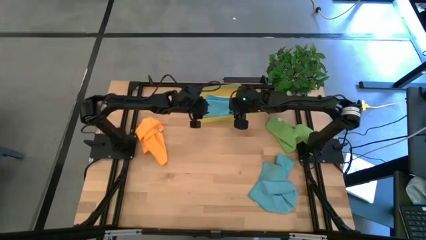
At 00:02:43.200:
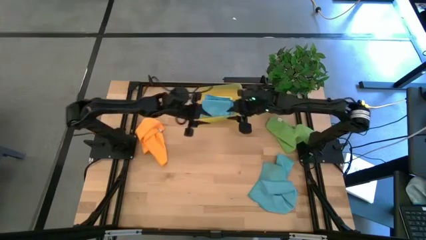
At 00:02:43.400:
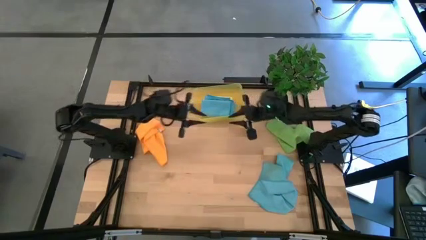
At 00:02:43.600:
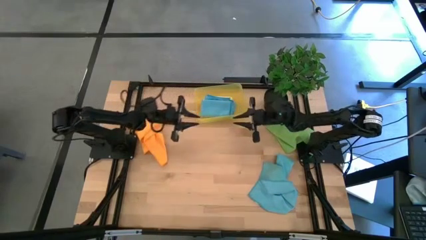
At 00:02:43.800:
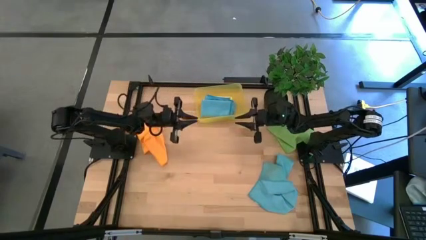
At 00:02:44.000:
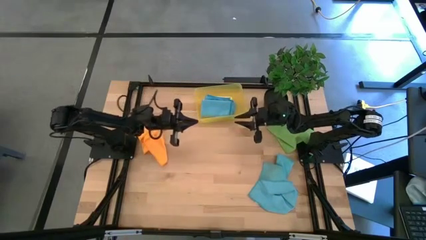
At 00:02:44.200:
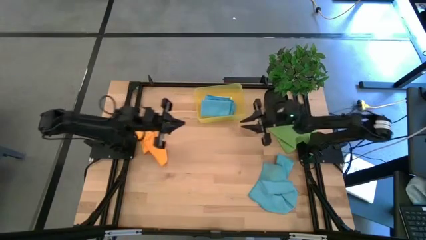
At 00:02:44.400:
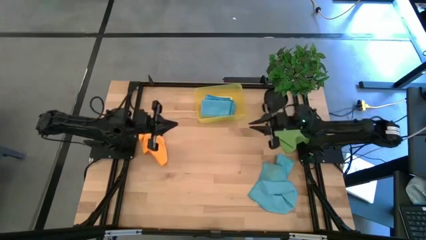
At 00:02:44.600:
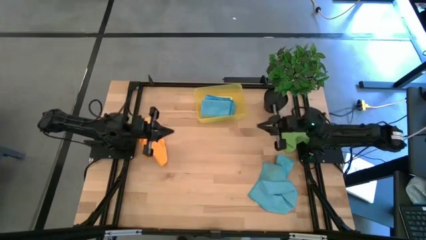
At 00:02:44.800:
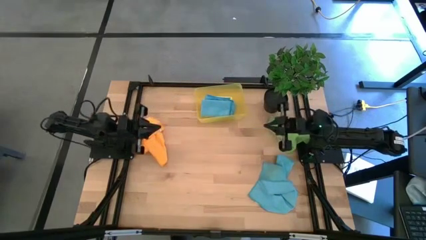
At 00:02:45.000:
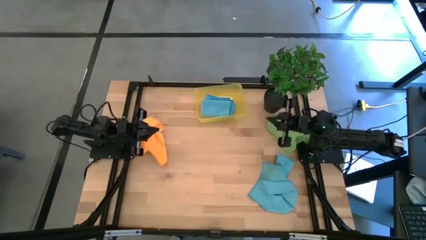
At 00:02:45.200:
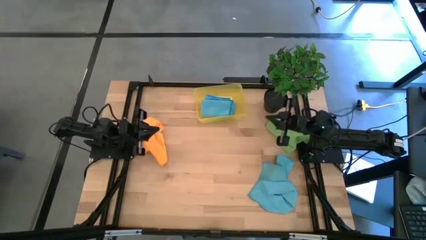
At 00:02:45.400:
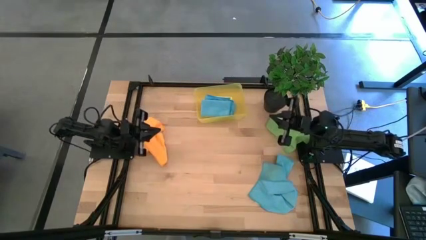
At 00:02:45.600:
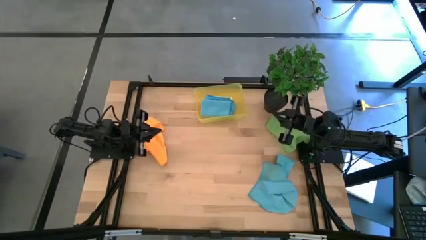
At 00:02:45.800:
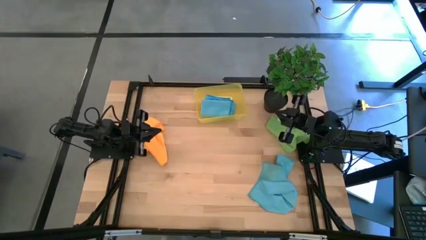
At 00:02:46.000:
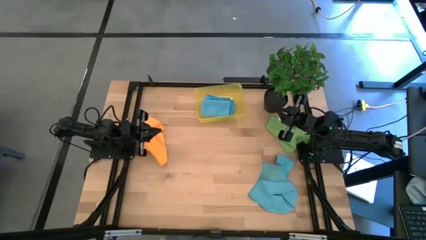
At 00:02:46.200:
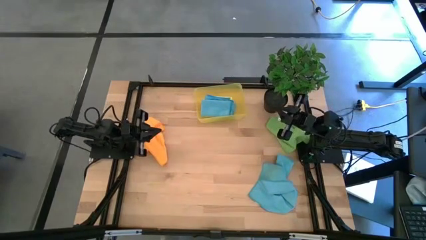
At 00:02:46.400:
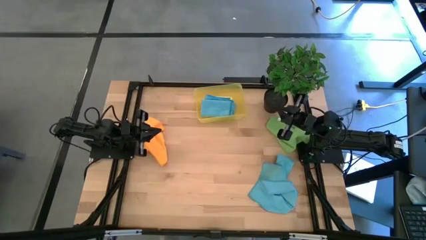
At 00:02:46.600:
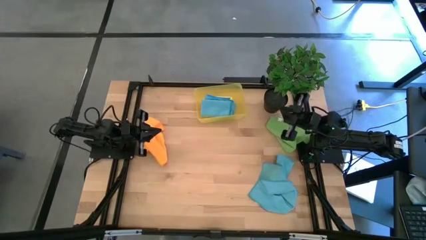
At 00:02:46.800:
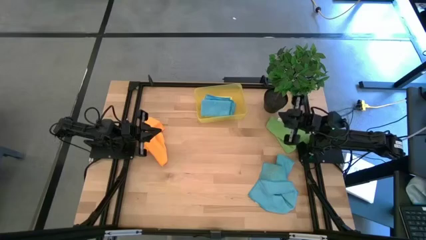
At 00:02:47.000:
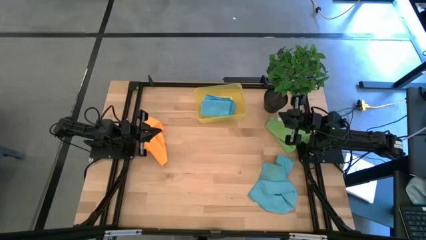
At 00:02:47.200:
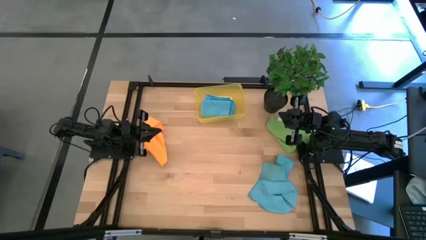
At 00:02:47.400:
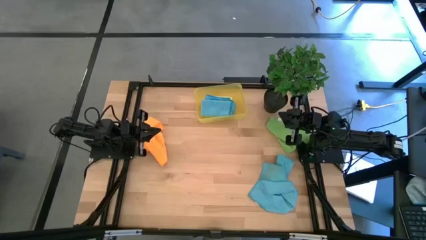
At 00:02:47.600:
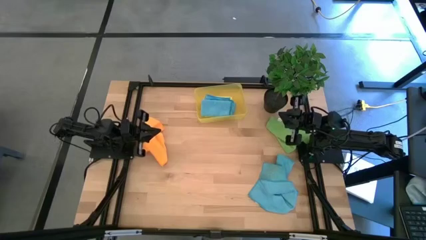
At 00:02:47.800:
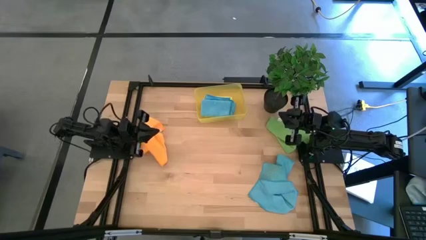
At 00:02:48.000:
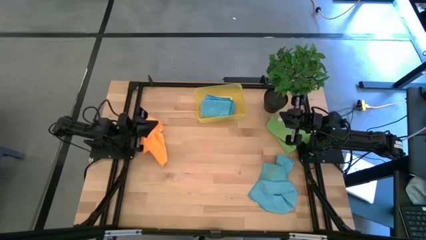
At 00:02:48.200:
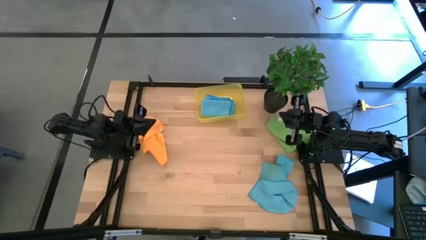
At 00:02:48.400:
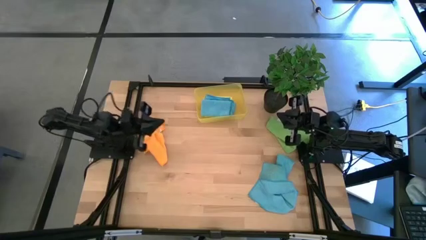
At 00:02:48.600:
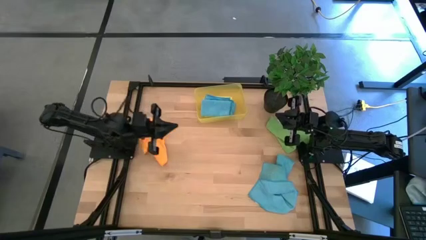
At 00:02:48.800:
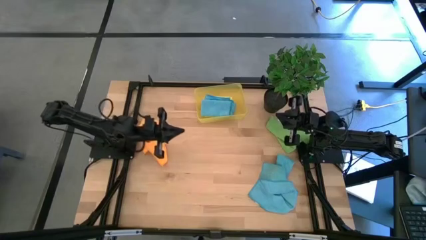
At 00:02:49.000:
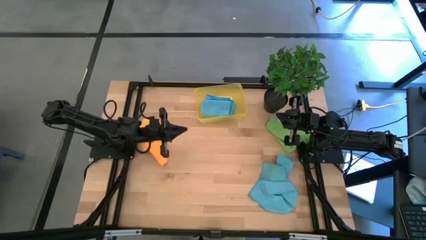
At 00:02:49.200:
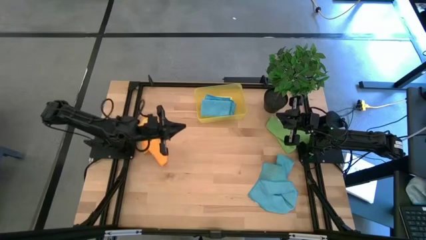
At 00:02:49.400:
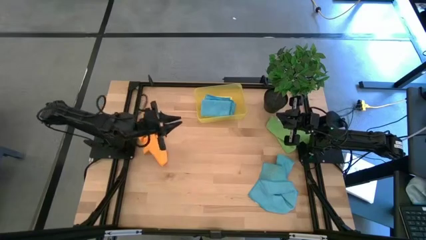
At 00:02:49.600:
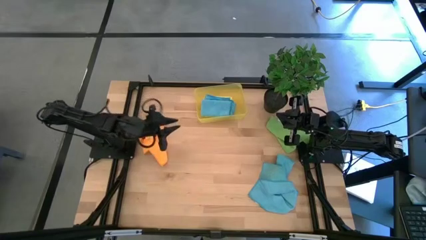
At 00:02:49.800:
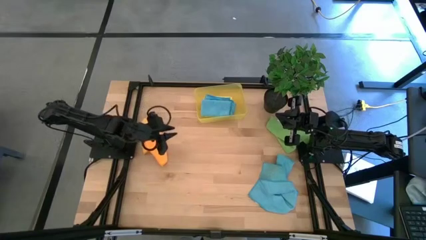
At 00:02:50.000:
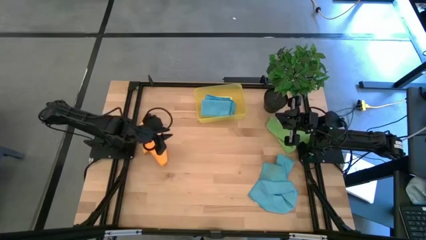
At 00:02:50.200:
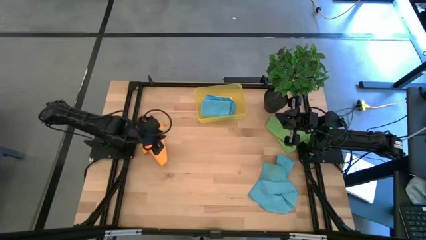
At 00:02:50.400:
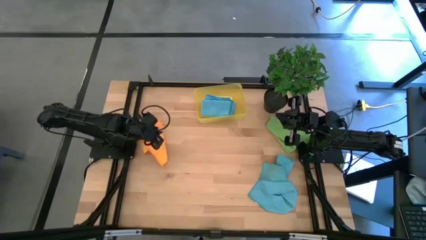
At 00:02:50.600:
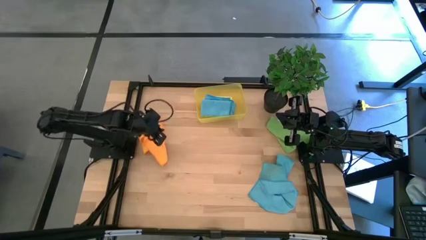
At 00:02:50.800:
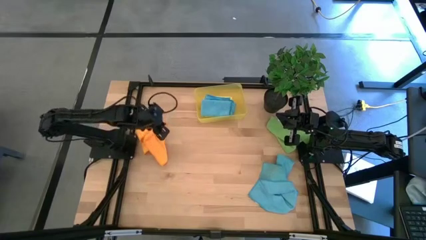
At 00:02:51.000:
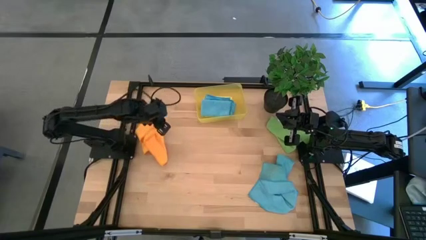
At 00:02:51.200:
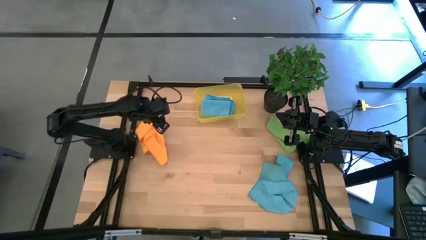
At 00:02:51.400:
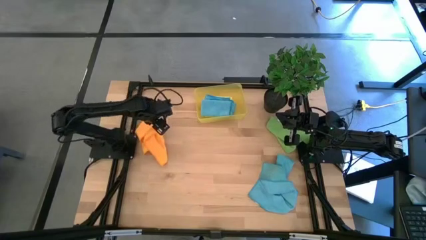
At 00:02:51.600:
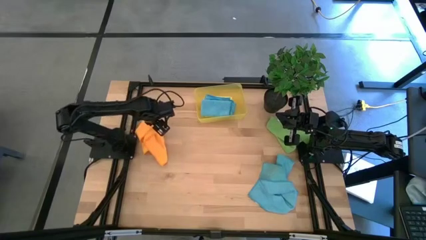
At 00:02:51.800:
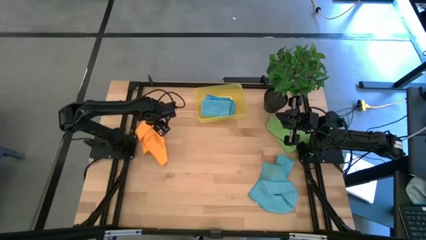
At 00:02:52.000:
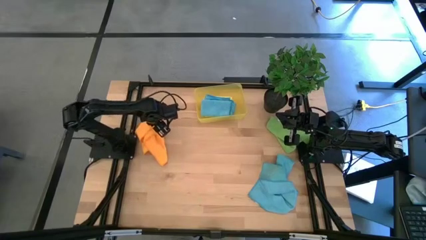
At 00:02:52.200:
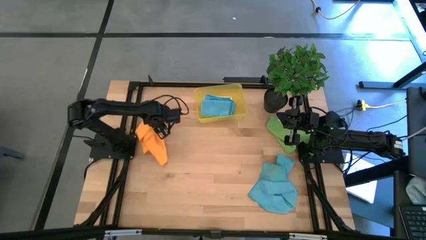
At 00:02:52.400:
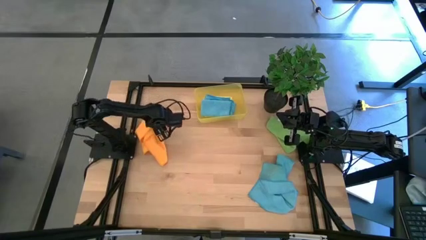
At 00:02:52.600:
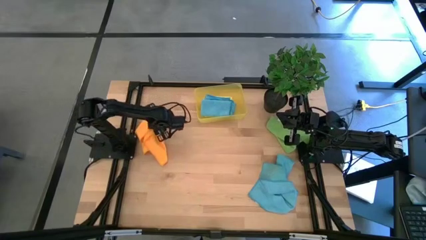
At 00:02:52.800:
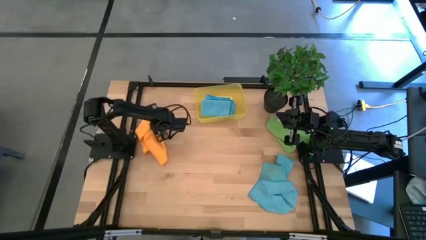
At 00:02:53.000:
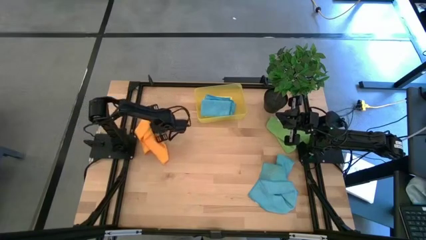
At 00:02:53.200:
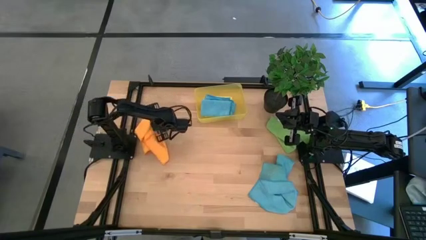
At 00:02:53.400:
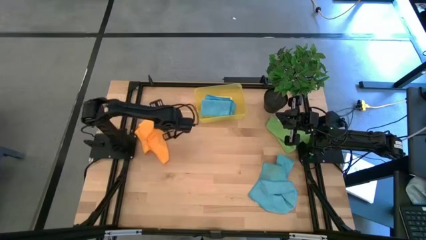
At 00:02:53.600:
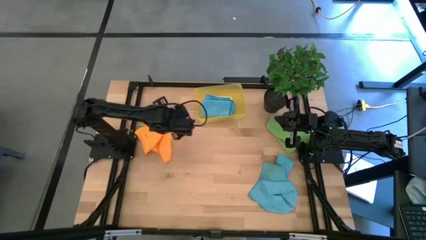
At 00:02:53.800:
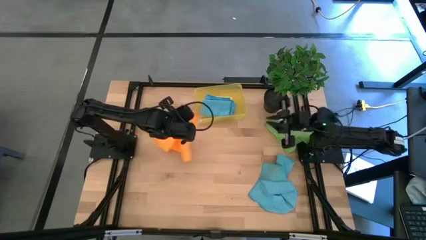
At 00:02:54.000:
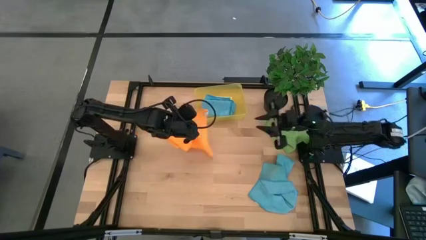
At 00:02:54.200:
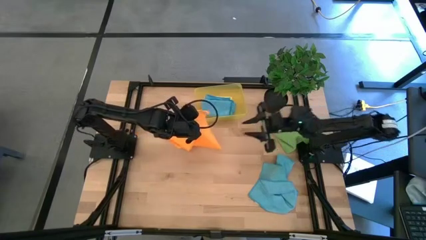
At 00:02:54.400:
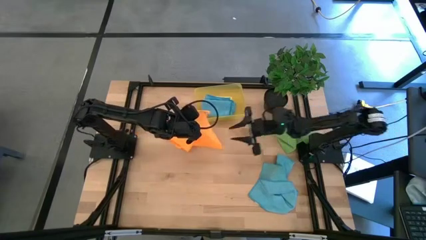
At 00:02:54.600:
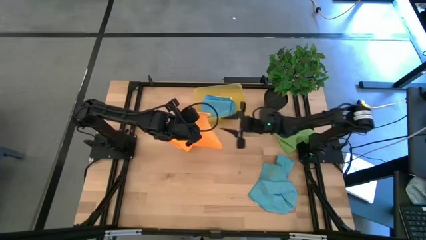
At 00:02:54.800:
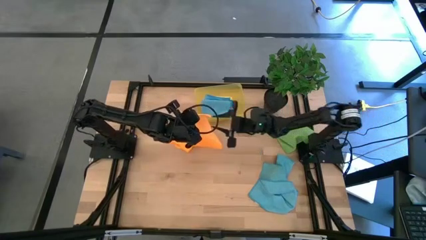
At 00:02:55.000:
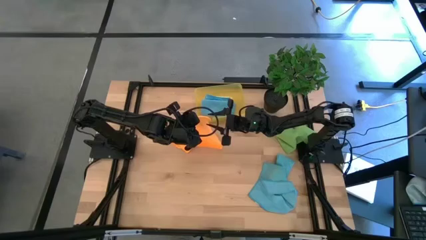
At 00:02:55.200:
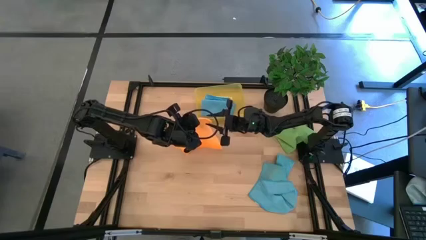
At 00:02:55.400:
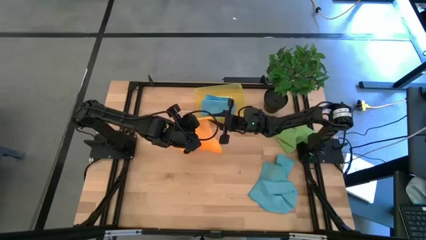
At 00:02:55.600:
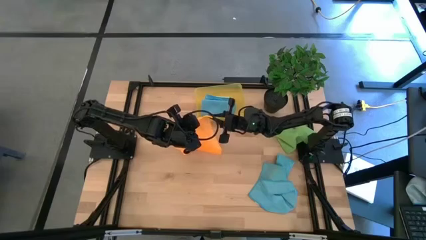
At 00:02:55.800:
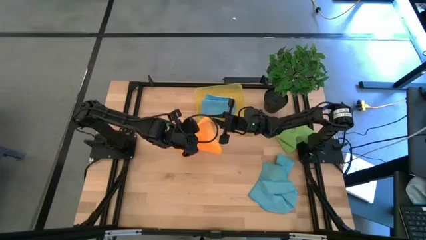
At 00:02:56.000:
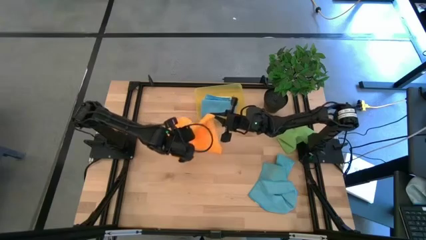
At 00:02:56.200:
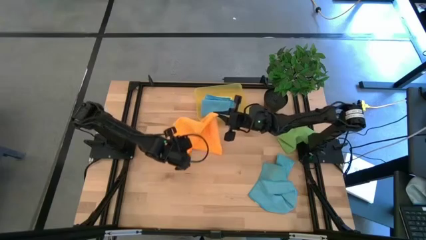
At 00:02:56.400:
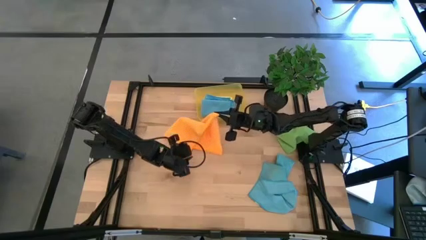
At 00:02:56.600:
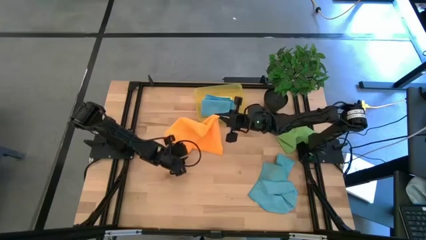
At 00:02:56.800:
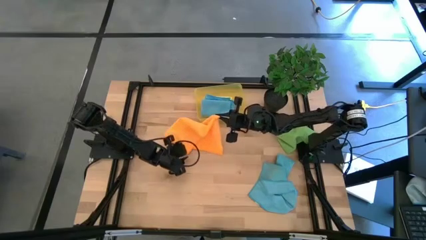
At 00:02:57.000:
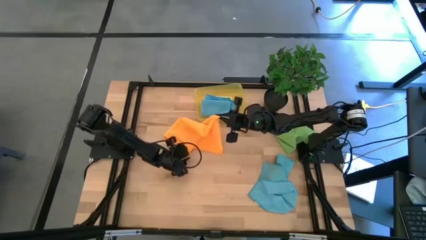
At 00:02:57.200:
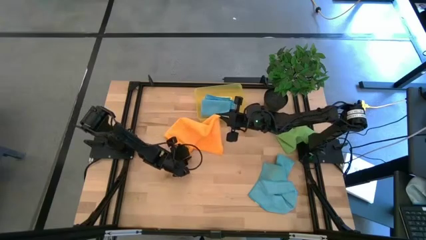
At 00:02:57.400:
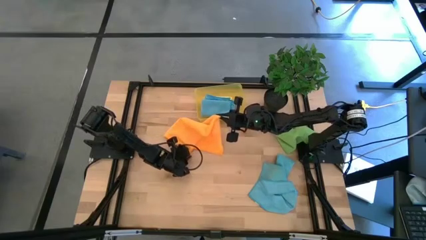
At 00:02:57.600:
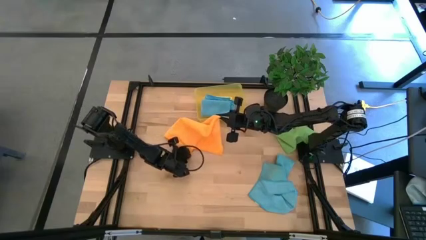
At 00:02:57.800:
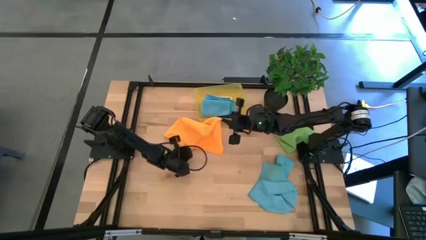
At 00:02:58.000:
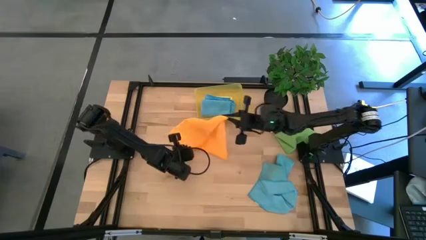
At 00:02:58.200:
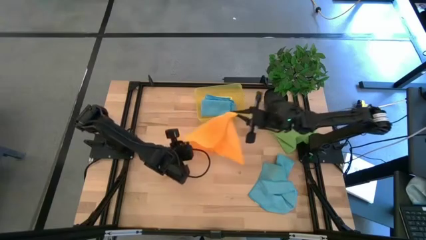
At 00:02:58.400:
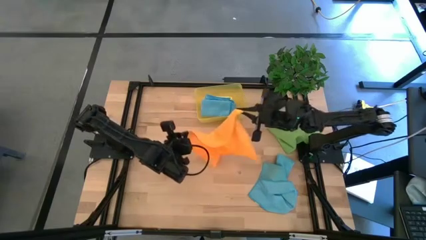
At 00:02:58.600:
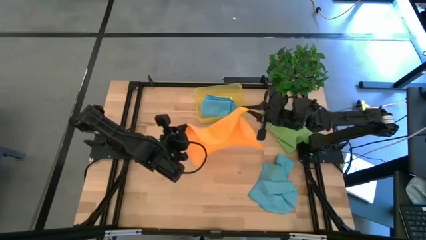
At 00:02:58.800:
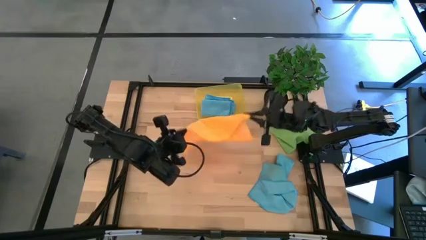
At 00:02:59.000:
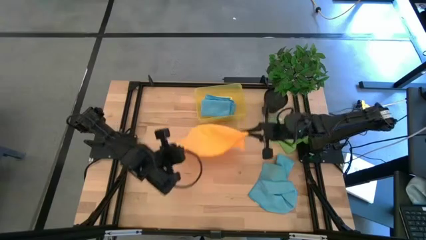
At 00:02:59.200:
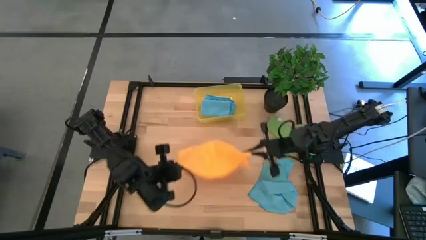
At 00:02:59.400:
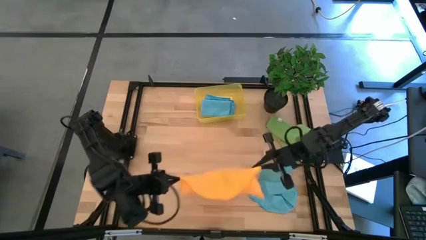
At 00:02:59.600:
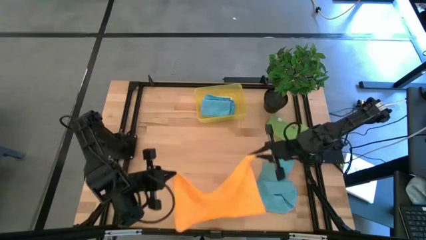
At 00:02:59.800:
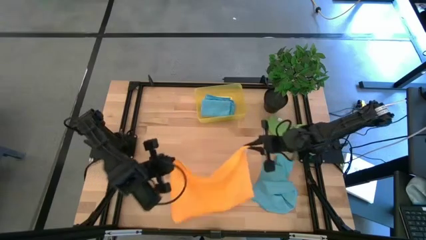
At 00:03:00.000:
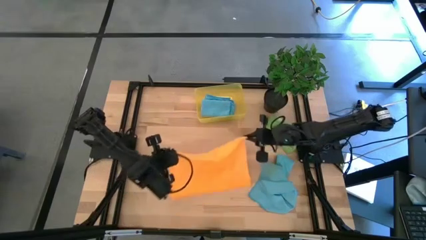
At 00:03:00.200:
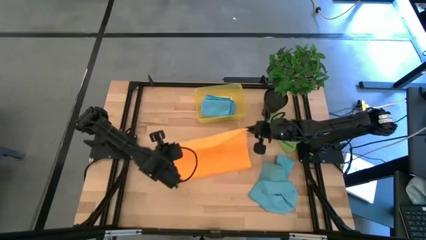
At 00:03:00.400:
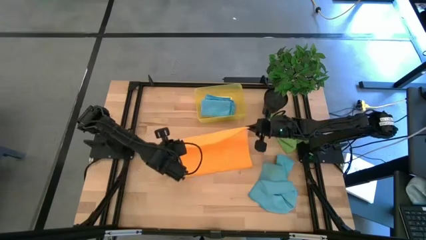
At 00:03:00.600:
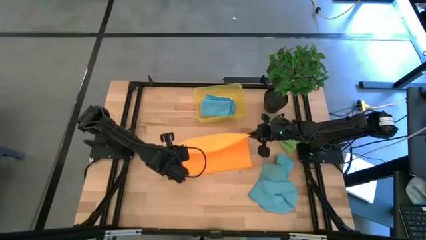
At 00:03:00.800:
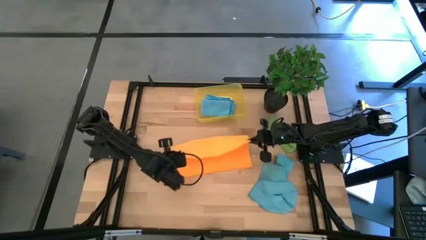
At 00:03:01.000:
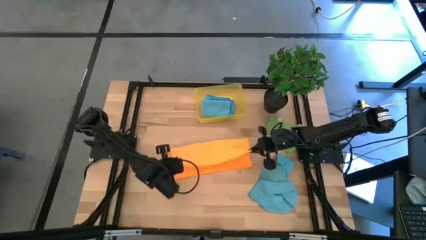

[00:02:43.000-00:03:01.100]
Task: Fold microfiber towels
Fold the orange microfiber towel
